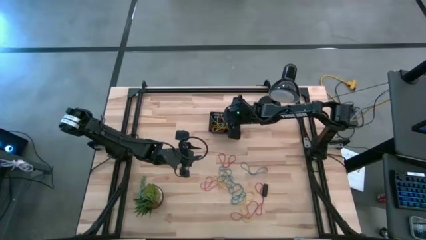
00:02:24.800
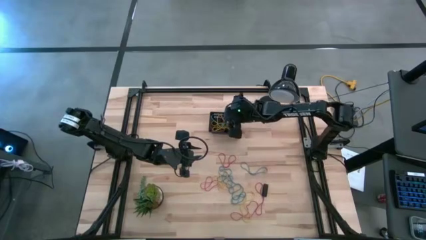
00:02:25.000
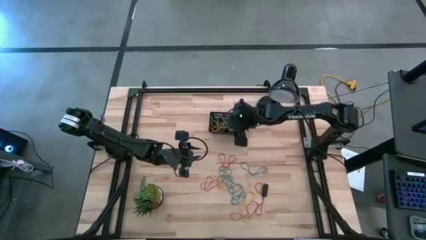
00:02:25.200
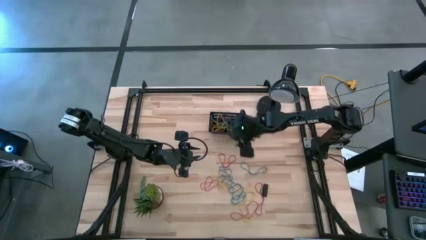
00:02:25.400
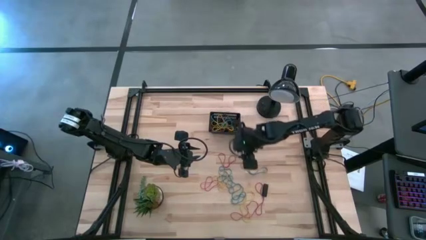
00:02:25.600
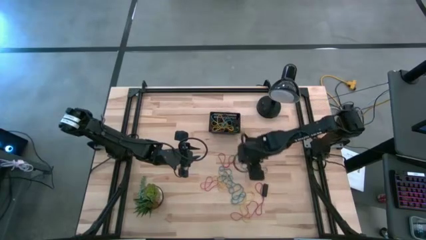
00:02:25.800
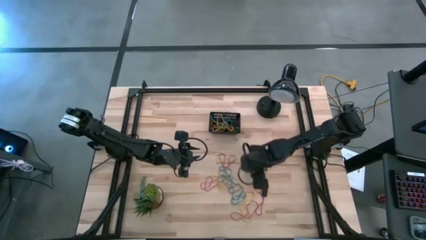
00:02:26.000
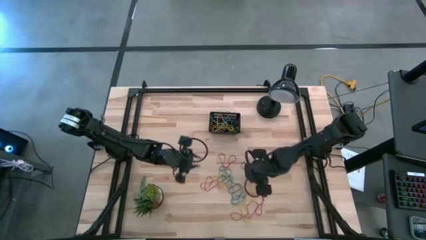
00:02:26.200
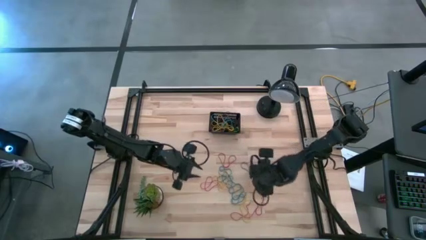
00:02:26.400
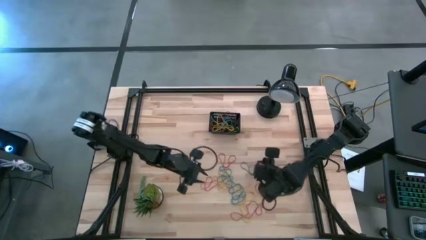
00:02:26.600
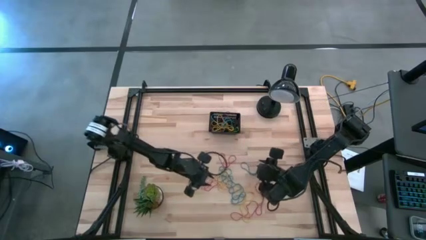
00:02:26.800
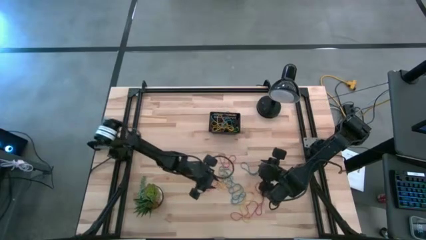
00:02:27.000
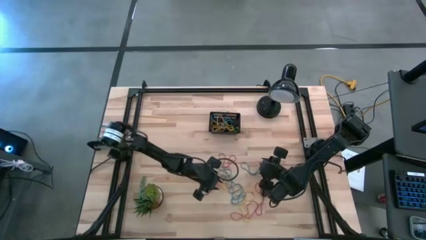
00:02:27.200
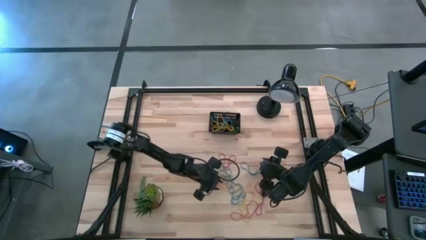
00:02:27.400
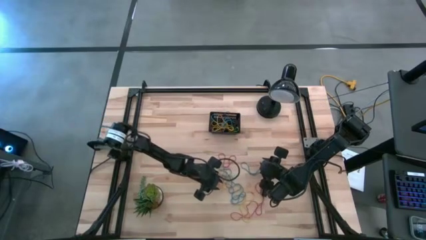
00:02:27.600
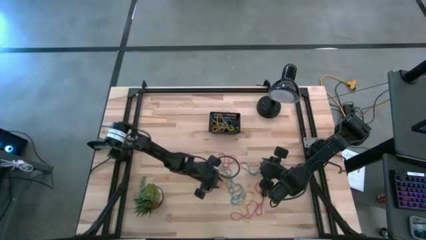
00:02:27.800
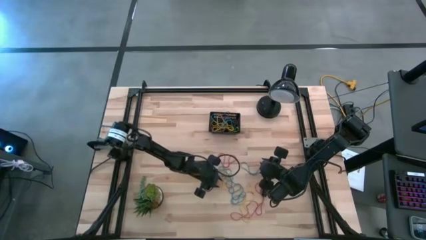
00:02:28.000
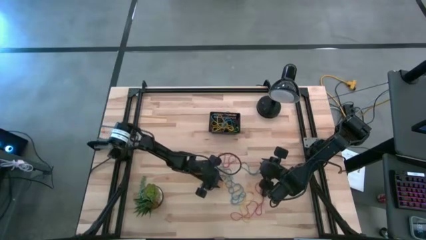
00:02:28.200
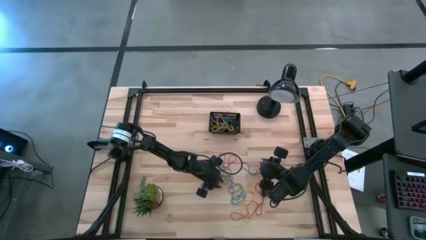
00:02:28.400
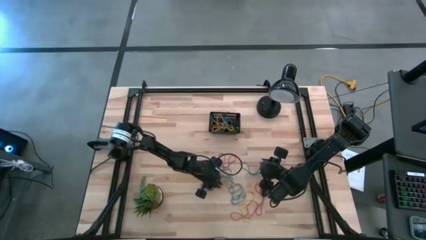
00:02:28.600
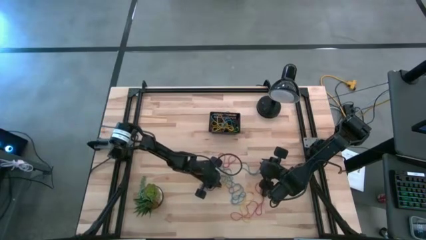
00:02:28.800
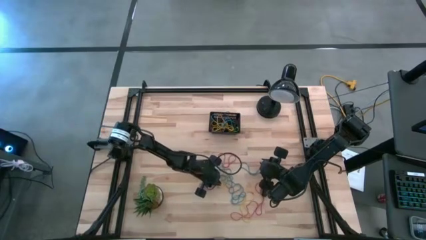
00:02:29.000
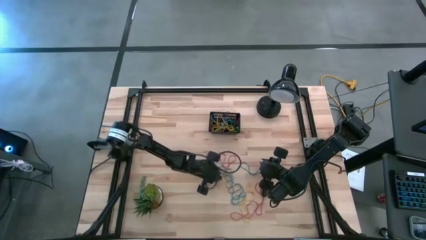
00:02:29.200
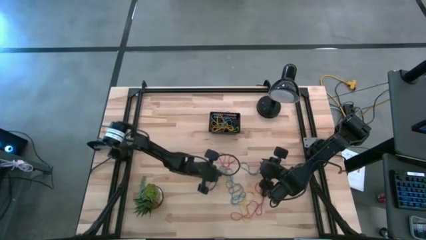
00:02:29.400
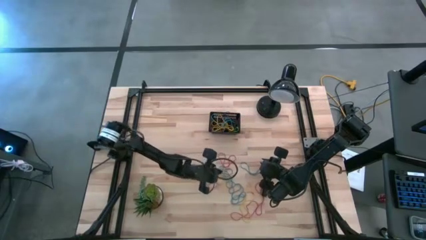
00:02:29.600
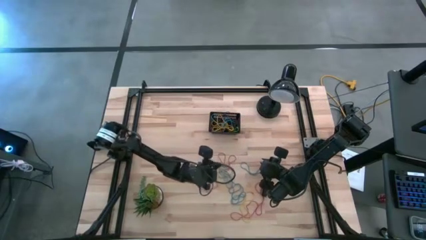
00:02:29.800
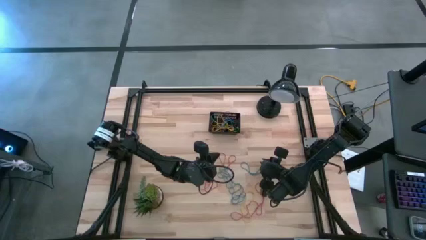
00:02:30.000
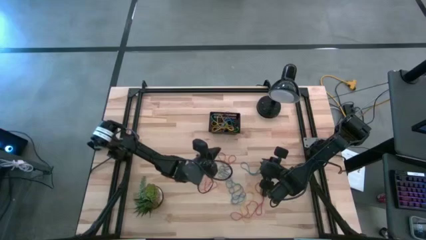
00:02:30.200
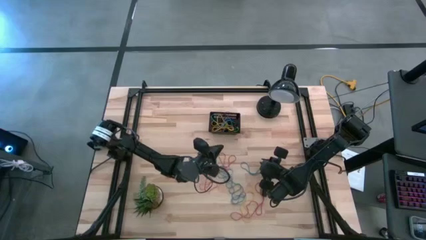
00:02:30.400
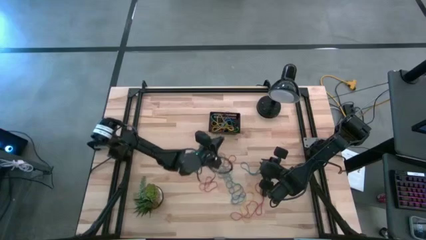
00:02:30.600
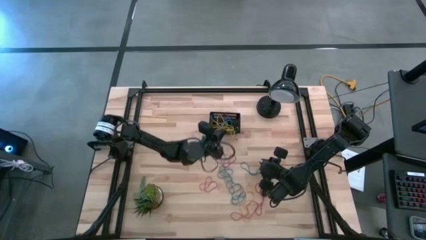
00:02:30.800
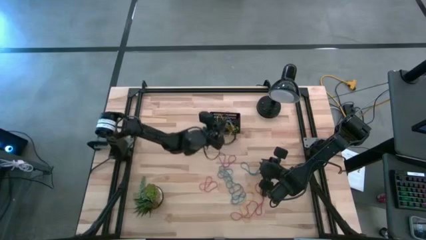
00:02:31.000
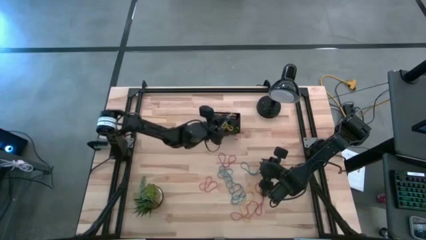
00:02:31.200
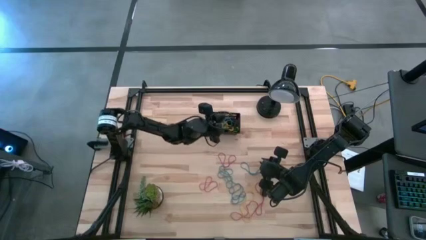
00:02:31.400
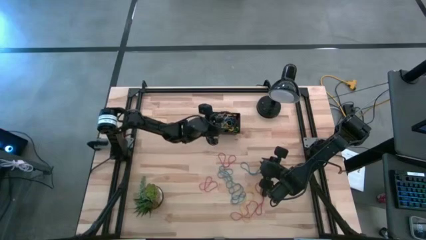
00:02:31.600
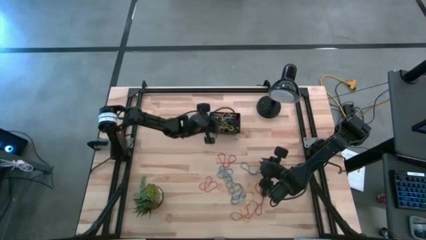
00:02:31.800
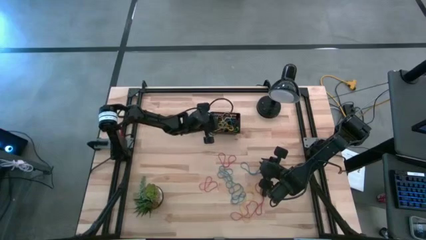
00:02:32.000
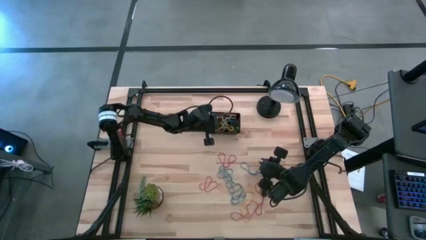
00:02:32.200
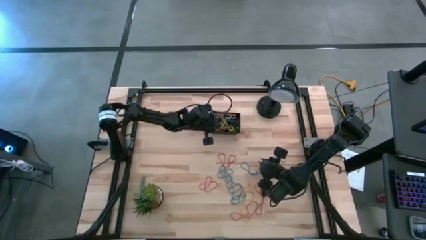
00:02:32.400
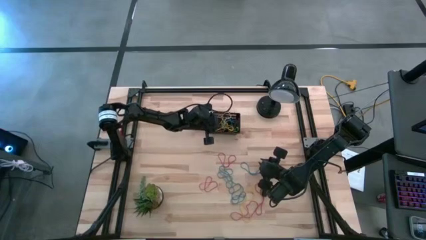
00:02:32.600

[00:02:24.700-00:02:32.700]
Task: Pick and place rubber bands into bin
Put the yellow rubber band into the basket

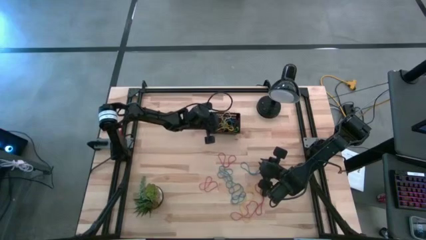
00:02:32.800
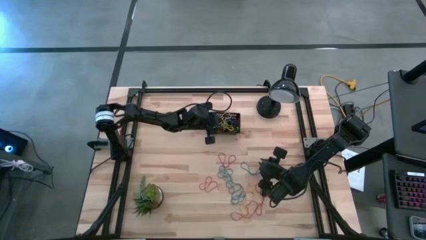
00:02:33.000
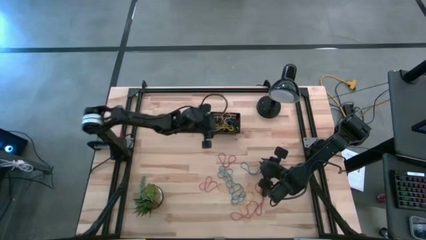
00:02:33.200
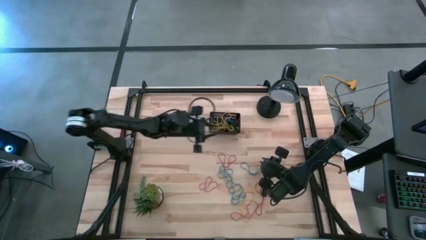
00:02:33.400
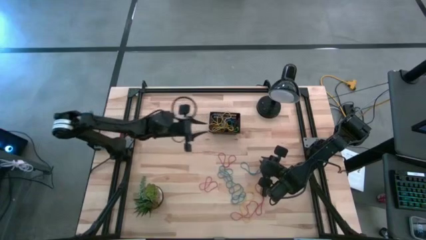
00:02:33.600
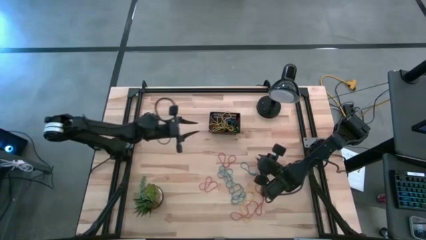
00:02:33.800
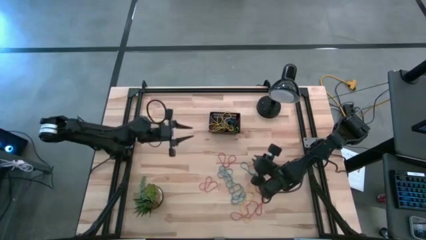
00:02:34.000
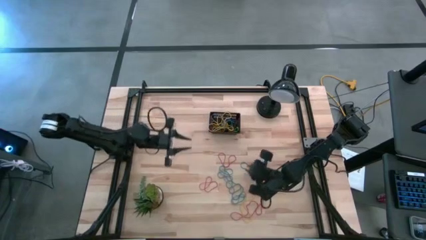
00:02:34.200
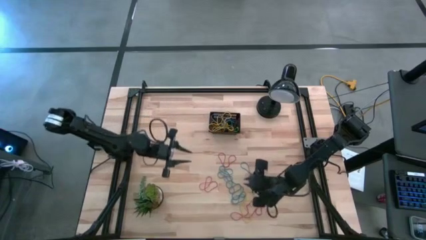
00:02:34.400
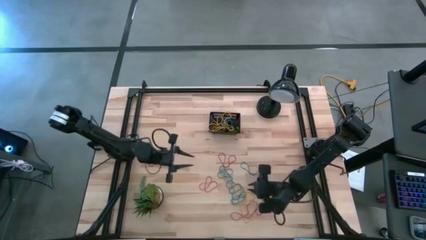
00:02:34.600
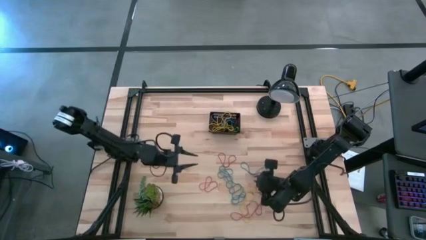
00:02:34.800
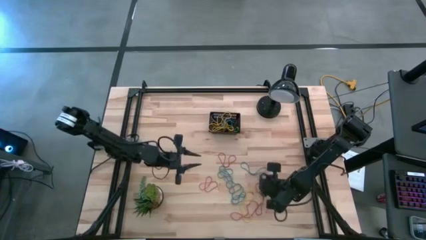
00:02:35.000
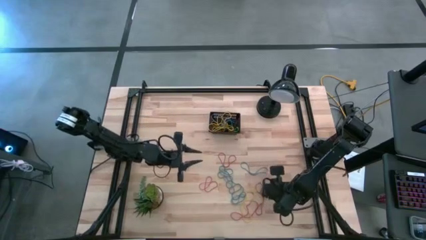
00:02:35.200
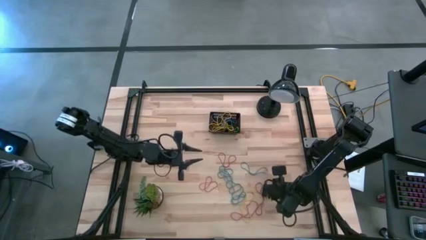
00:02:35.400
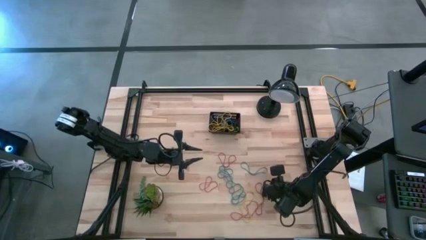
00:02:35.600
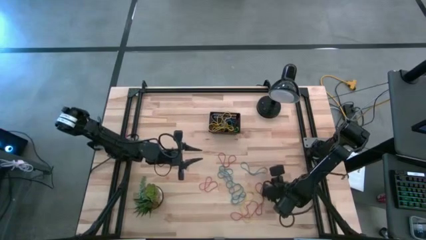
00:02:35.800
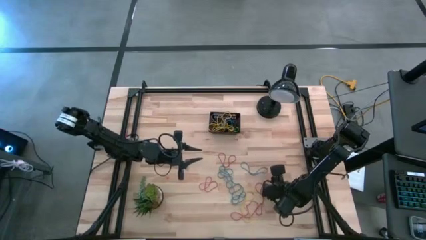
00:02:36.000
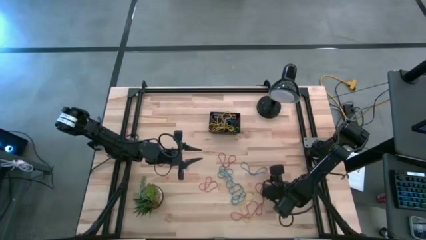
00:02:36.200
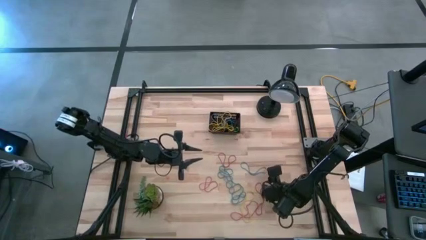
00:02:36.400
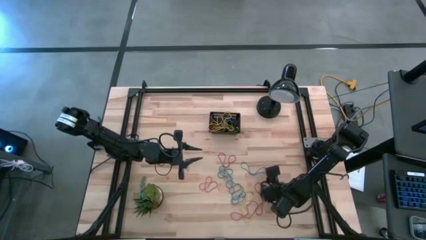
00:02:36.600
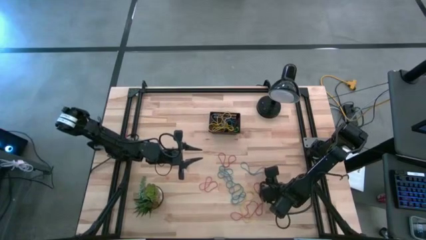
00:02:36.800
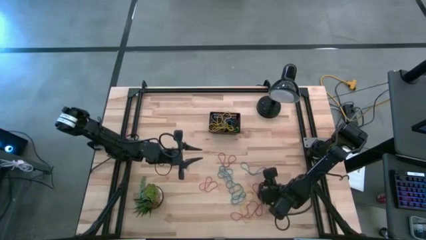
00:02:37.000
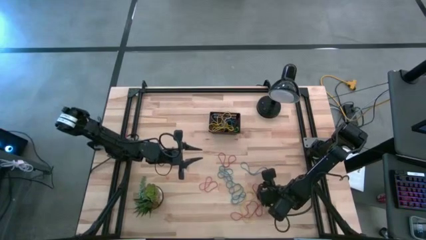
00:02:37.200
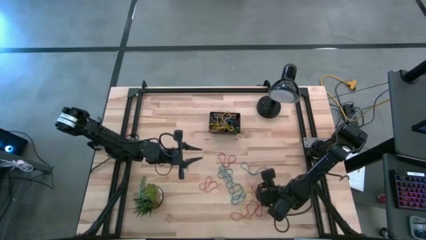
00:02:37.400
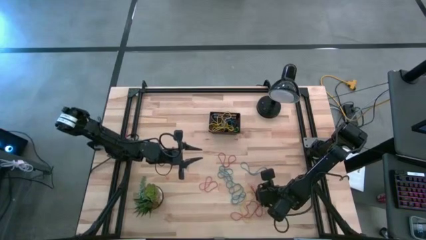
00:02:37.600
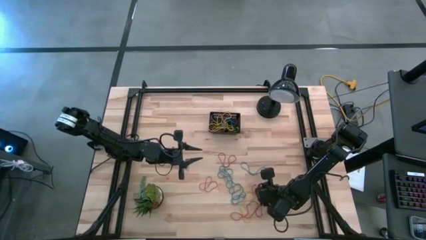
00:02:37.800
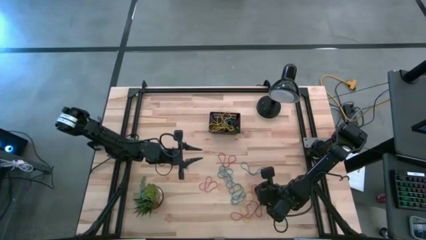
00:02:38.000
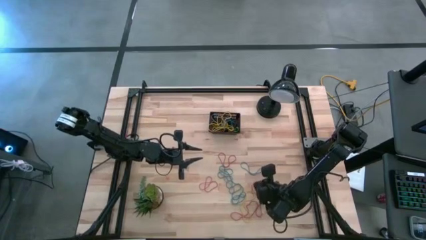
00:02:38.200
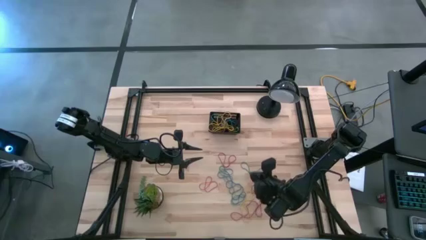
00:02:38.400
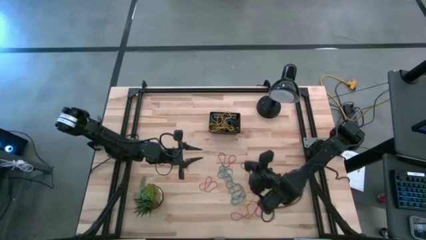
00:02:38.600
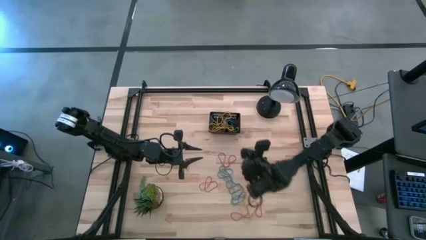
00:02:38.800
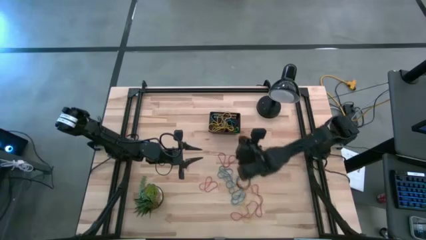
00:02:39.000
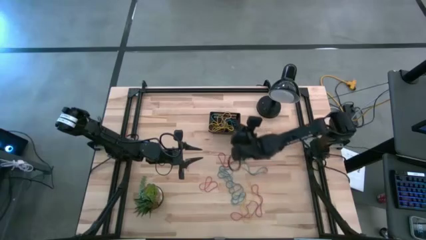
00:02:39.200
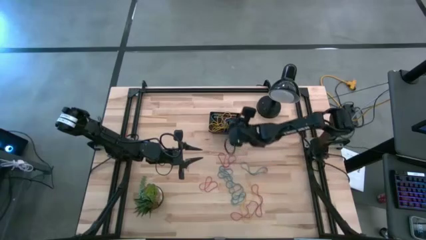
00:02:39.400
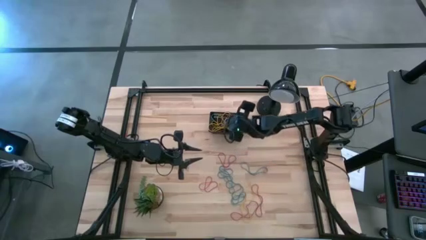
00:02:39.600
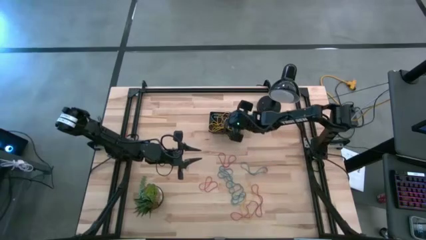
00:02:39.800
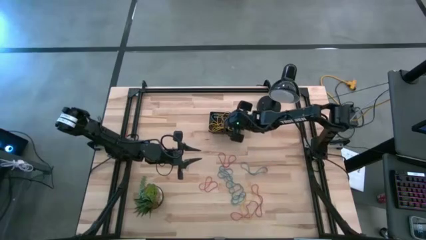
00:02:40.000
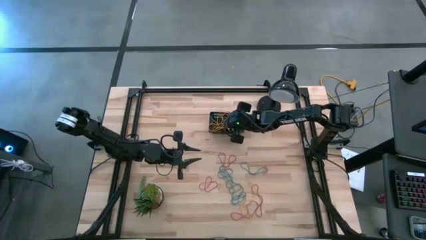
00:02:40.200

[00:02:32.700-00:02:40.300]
Put the black rubber band into the basket
